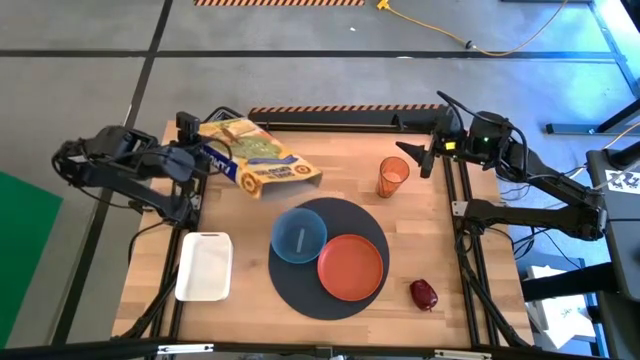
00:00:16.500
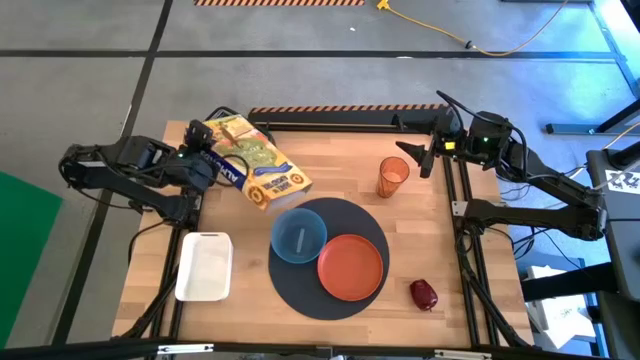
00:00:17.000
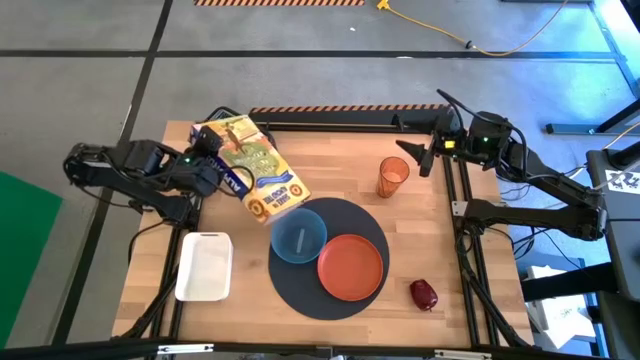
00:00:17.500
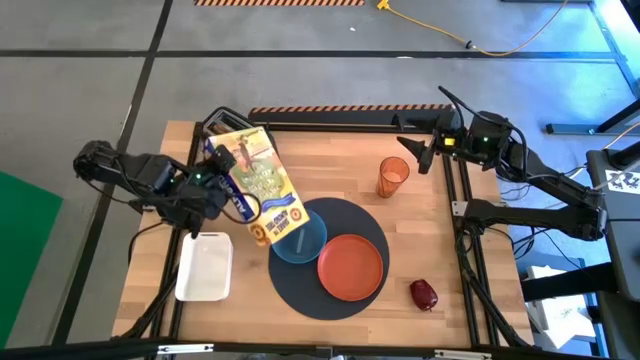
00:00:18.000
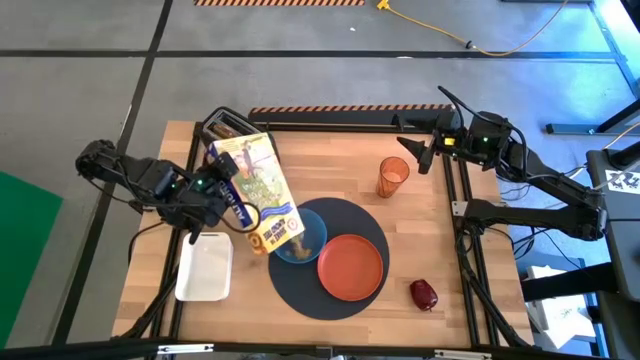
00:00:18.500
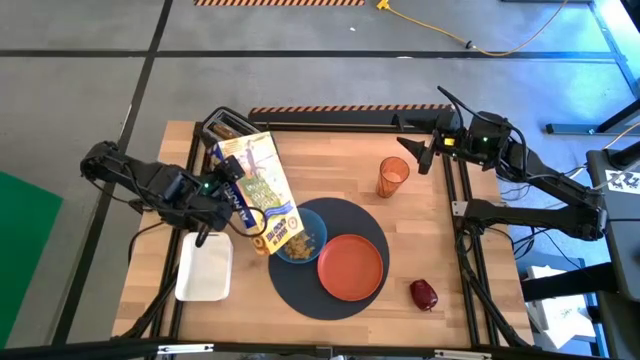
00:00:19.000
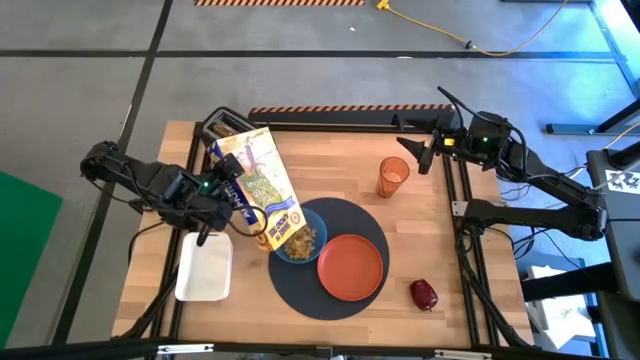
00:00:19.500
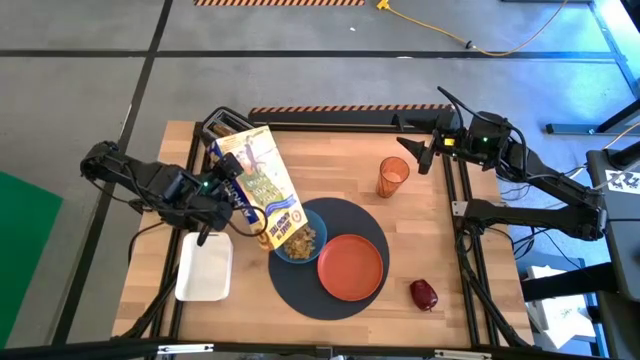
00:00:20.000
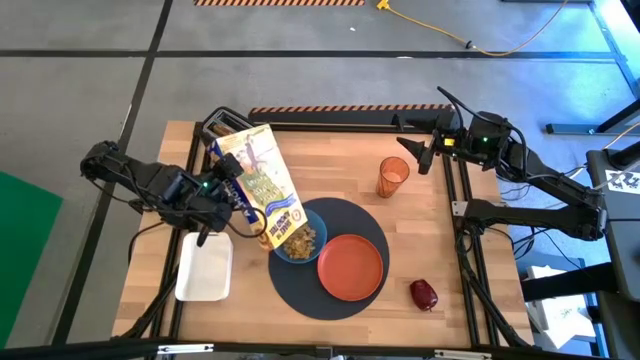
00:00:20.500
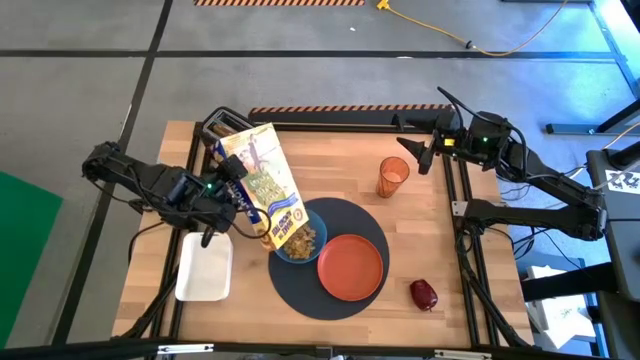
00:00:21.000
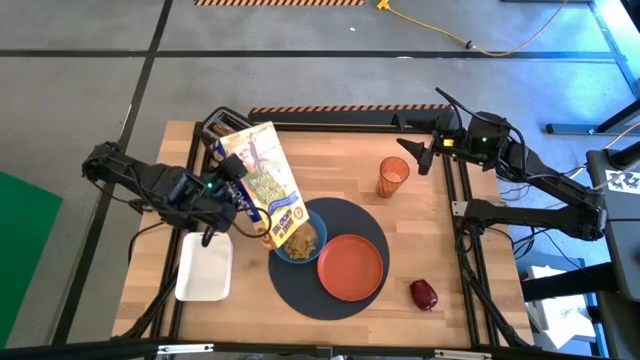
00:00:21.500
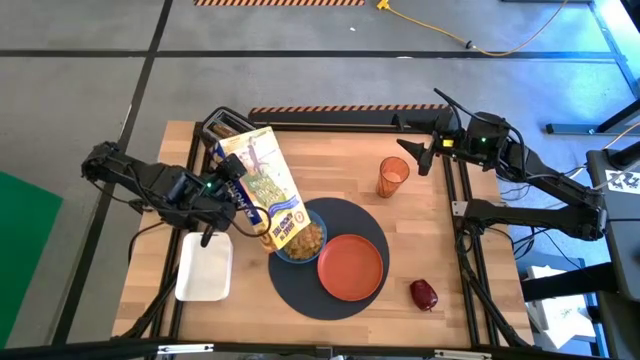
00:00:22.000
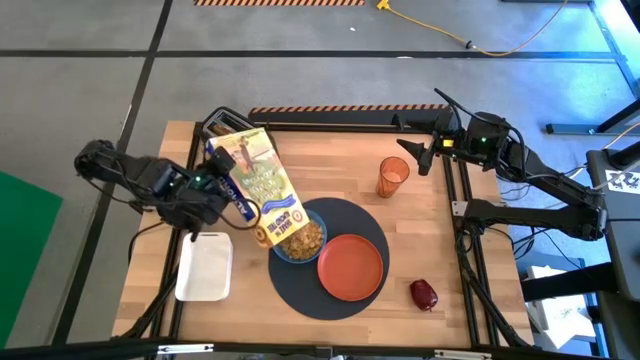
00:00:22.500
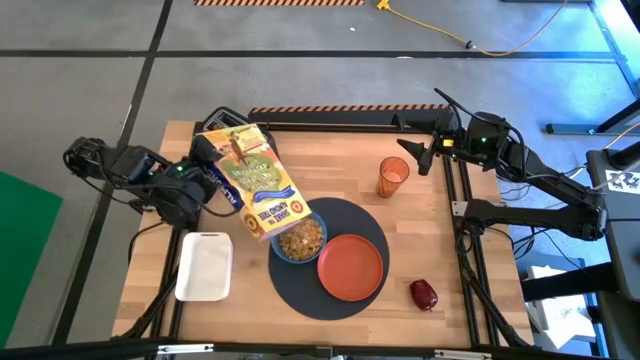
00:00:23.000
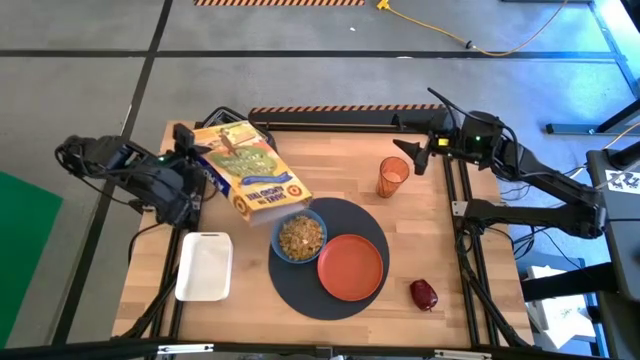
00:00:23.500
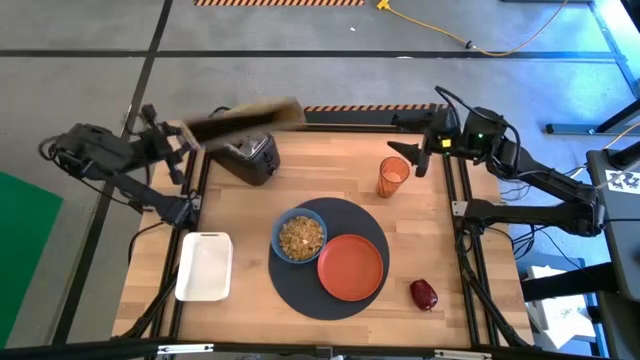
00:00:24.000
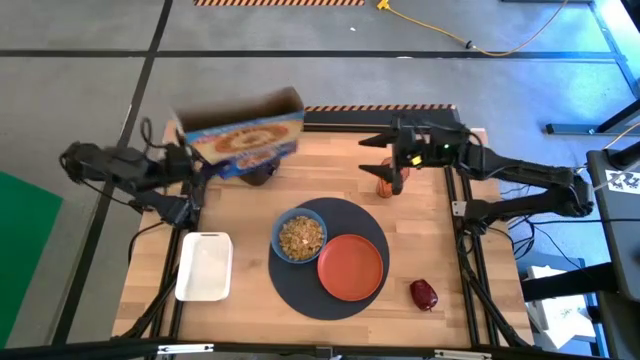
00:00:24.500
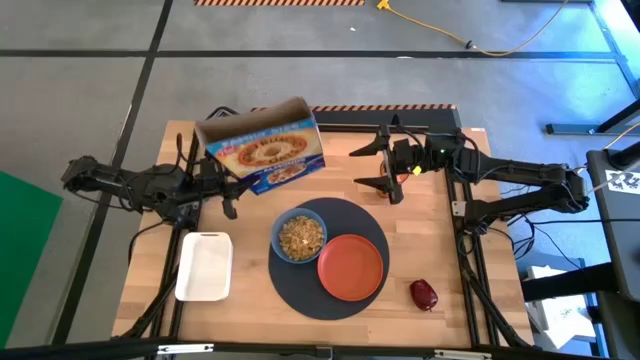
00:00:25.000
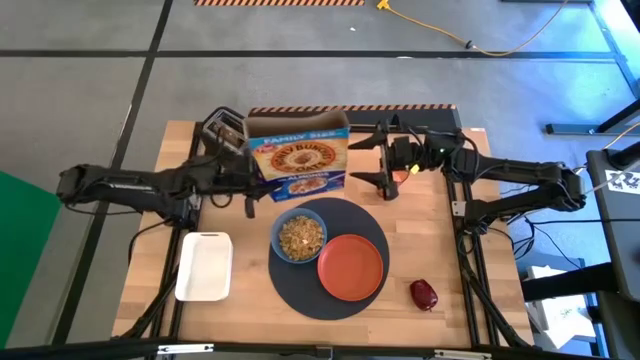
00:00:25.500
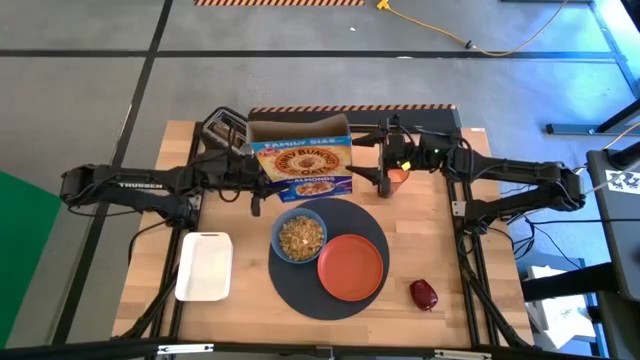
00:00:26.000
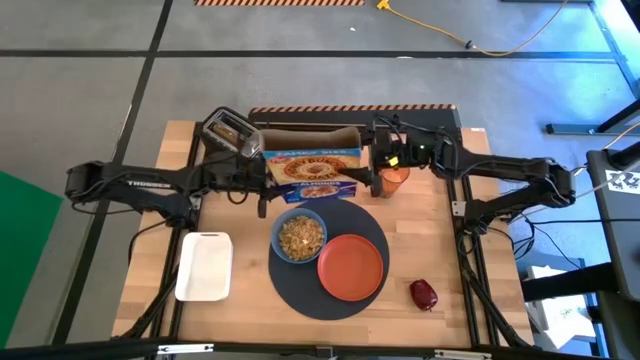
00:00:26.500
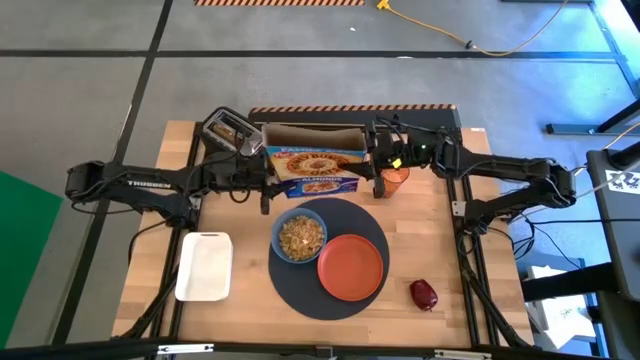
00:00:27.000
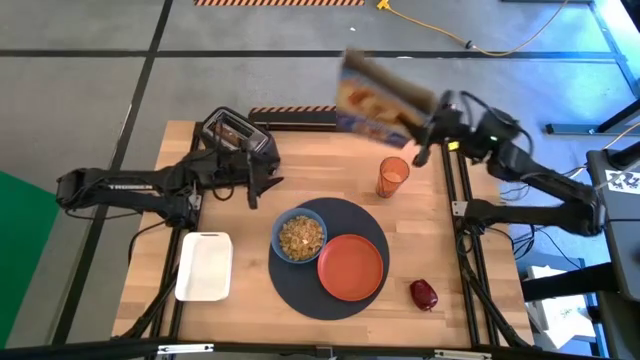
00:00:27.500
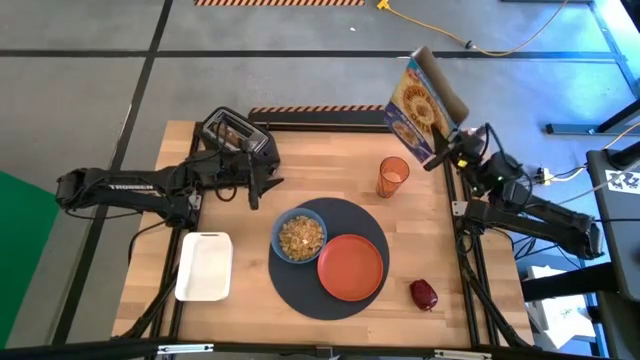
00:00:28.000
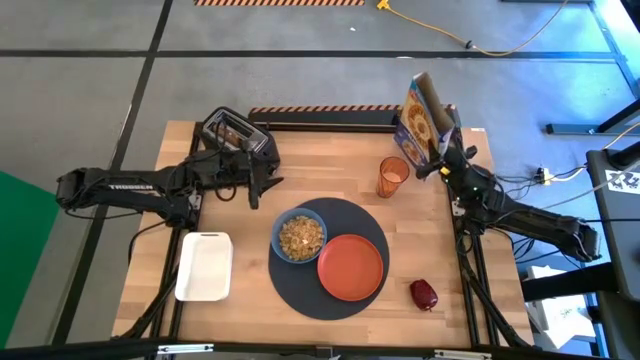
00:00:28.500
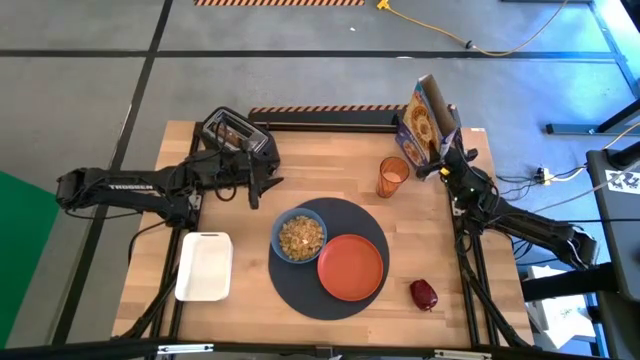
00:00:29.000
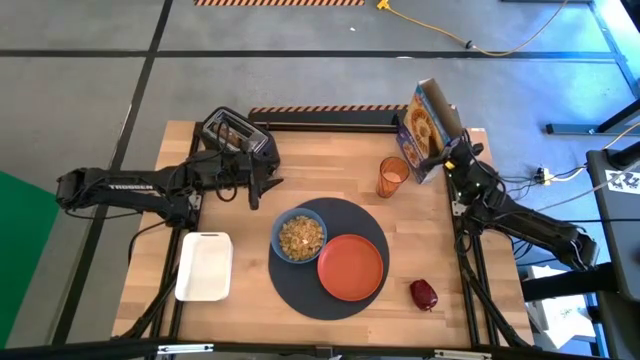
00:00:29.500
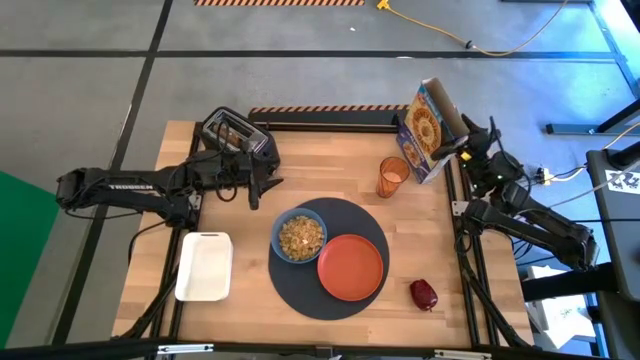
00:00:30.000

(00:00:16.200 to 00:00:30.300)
Task: Arrange a breakfast setting
Pour the cereal into the blue bowl

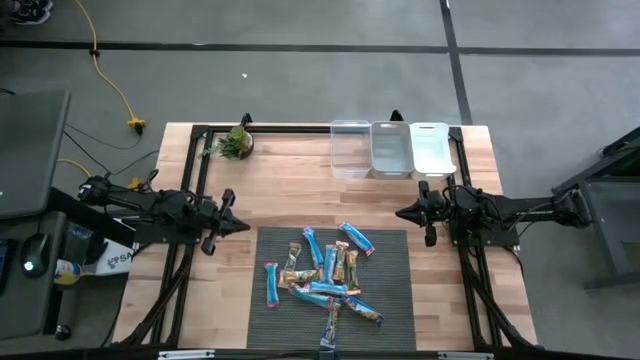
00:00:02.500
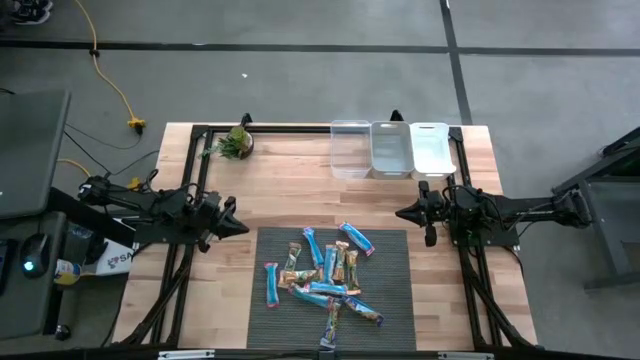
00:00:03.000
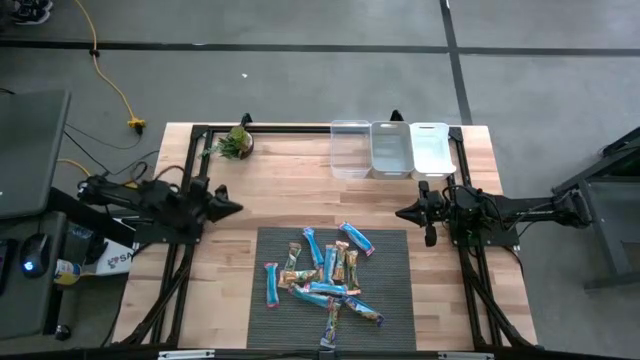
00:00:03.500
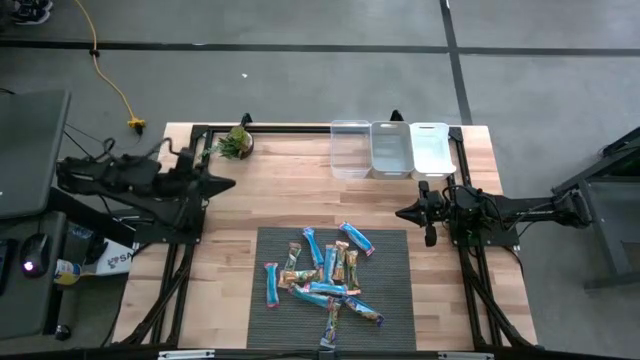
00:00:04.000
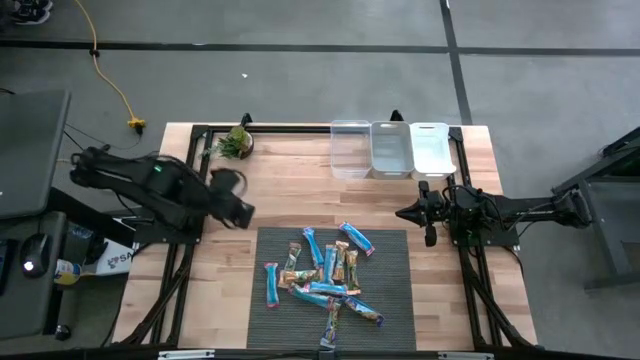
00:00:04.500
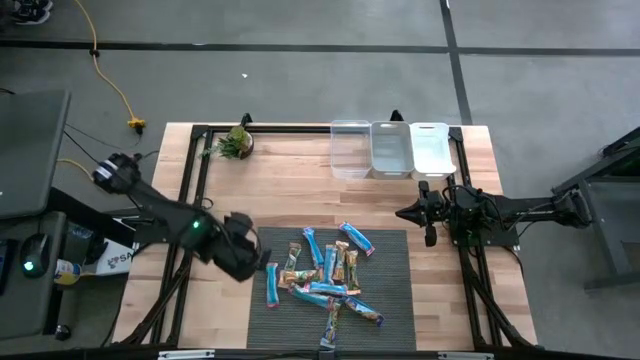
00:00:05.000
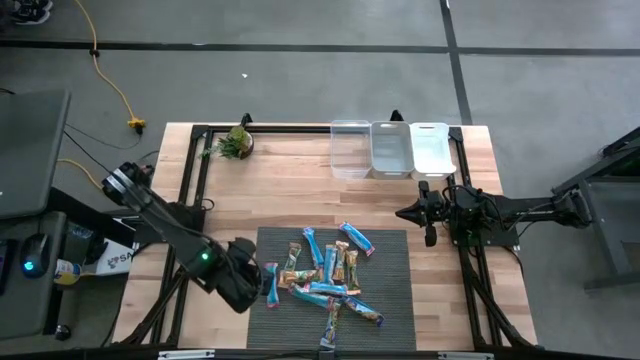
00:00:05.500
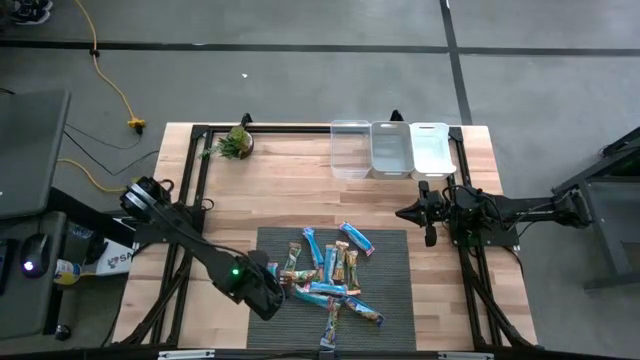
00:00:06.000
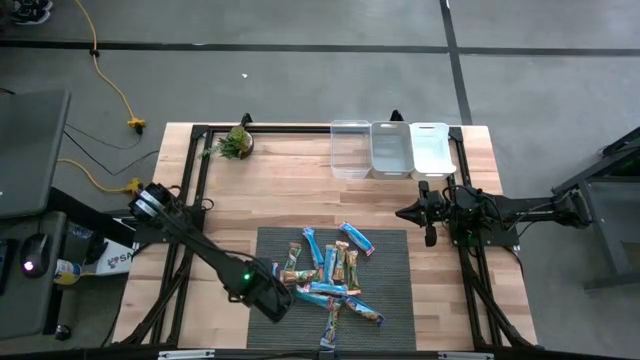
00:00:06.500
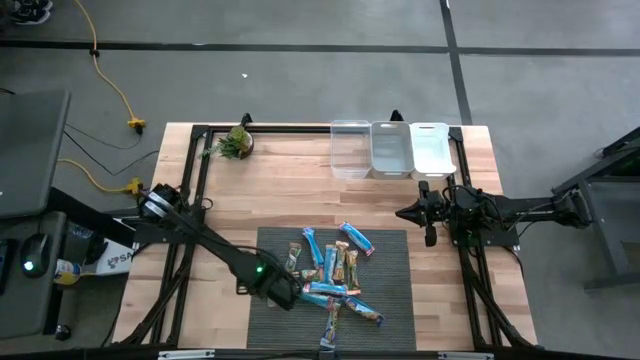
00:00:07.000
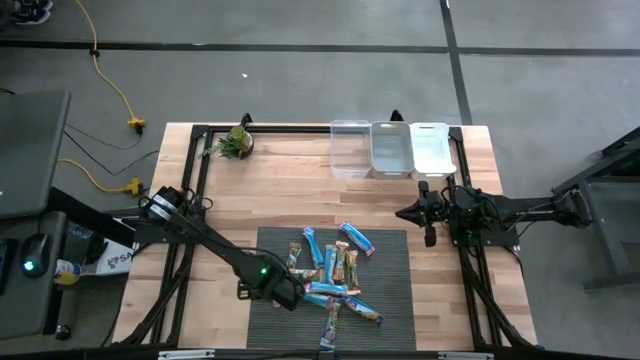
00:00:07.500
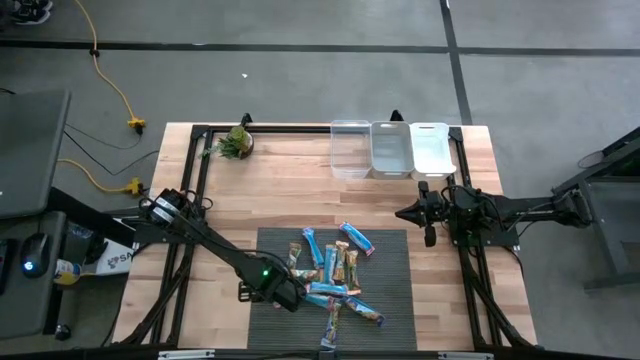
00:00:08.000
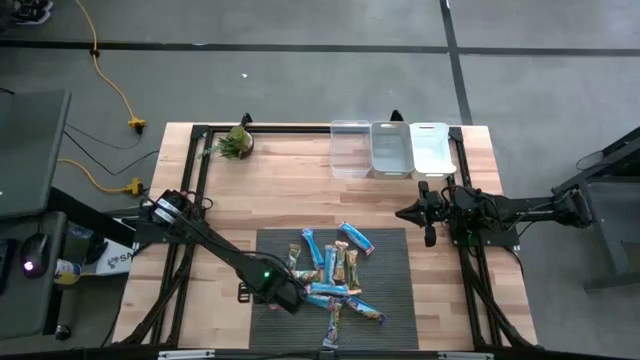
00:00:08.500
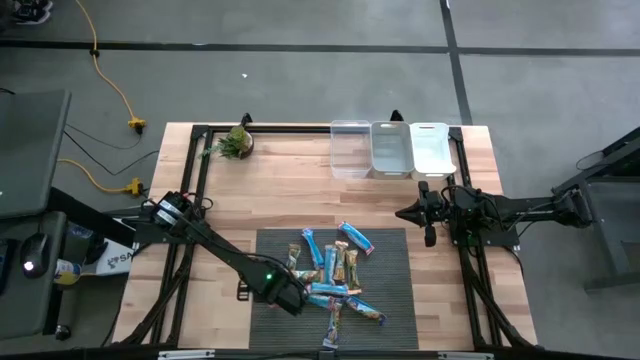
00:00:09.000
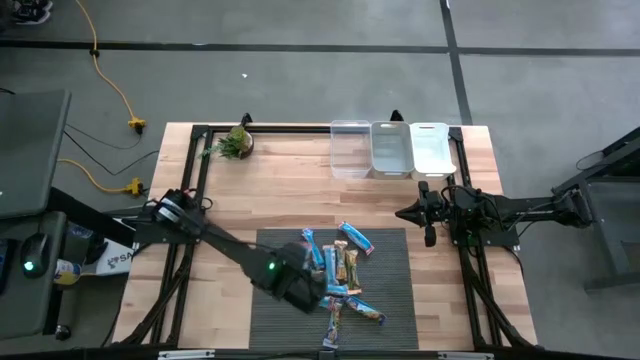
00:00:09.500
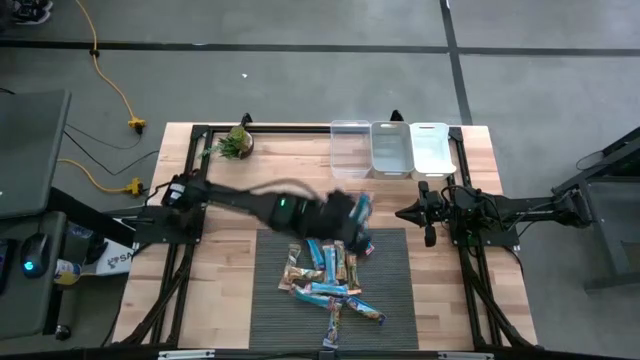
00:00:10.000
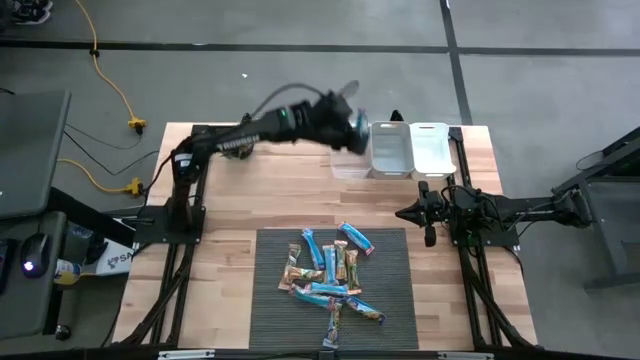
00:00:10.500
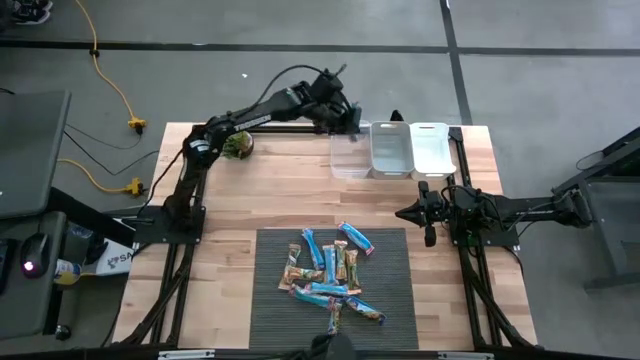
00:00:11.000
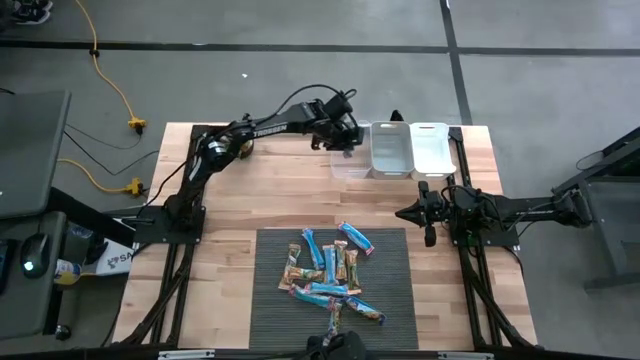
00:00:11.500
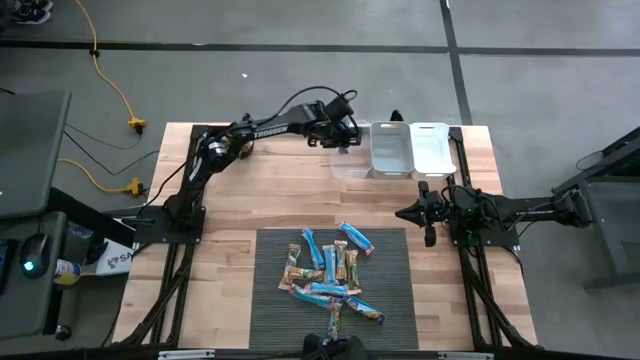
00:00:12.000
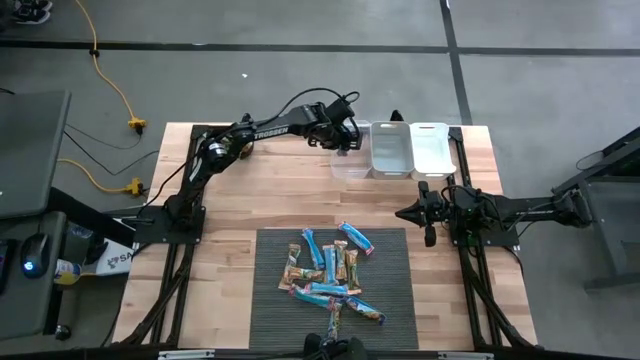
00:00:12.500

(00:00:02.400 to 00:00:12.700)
Task: Pick and place Granola Bars by type
Put the red granola bar into the transparent bin
